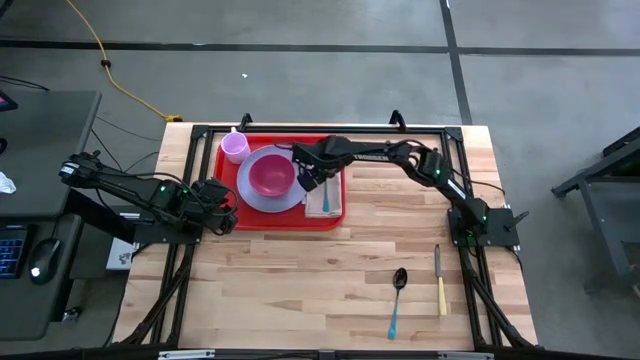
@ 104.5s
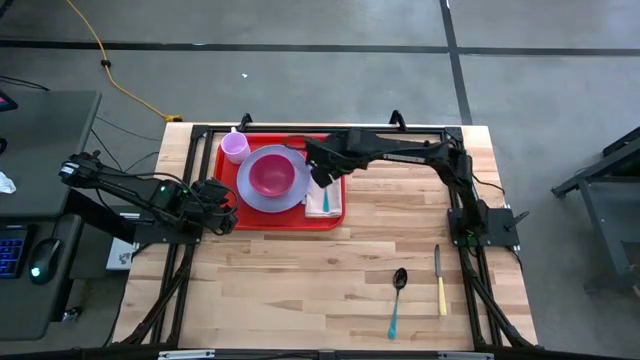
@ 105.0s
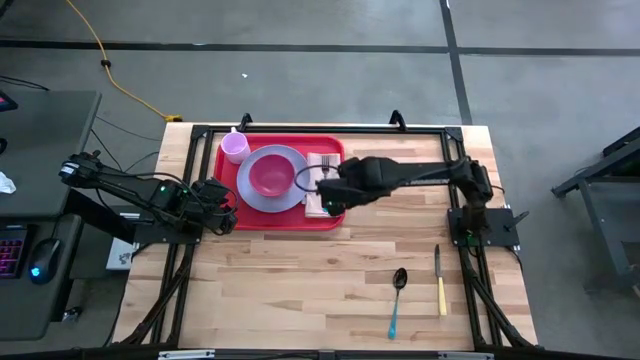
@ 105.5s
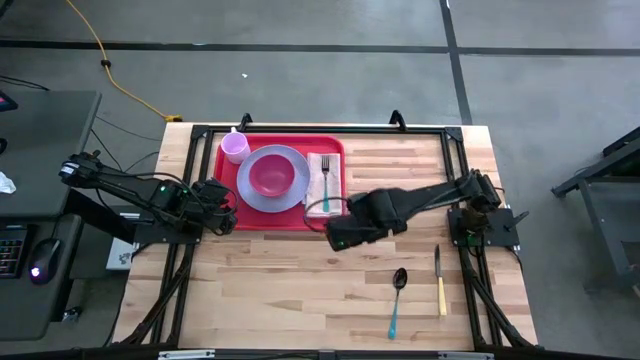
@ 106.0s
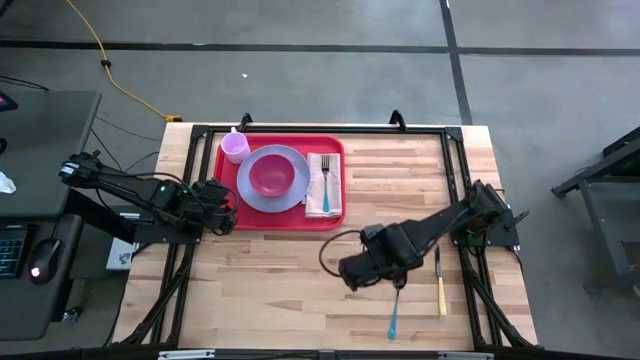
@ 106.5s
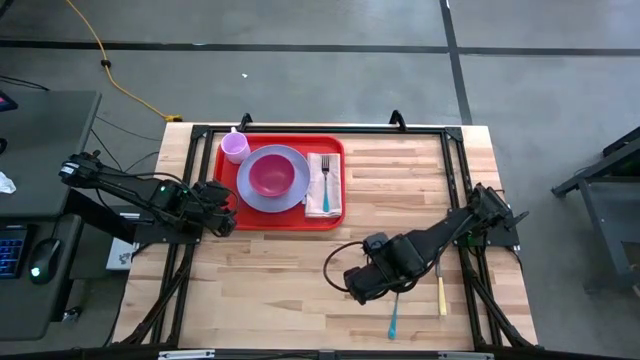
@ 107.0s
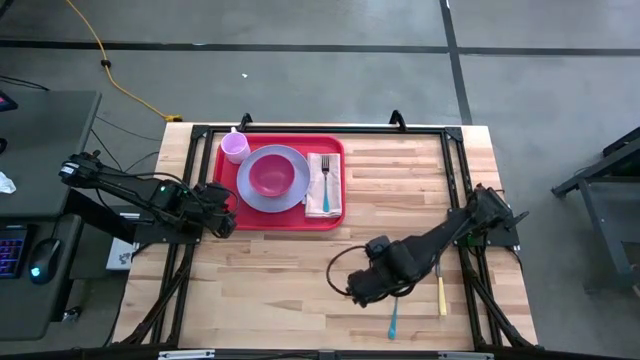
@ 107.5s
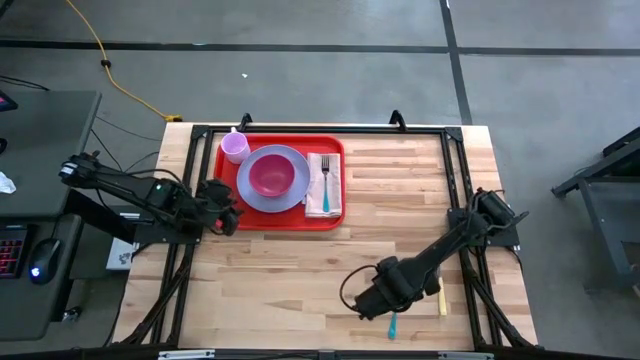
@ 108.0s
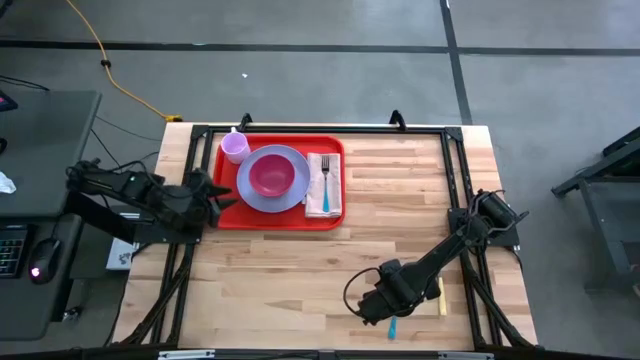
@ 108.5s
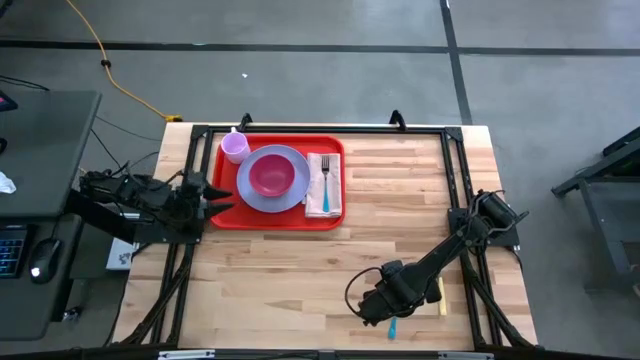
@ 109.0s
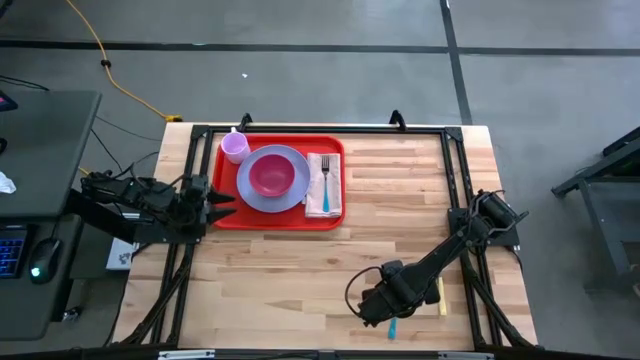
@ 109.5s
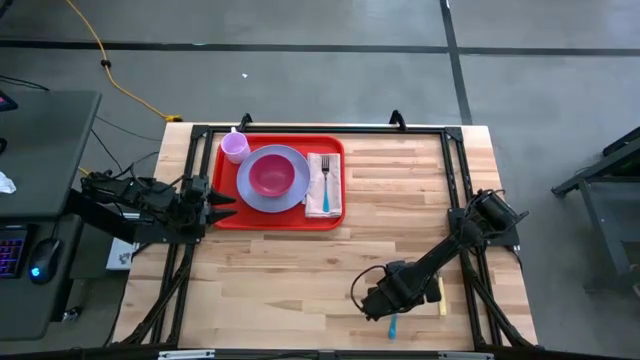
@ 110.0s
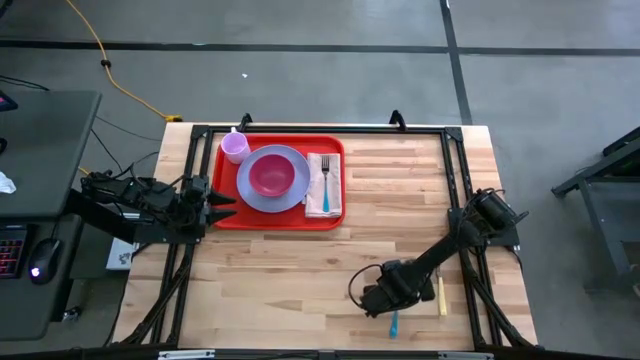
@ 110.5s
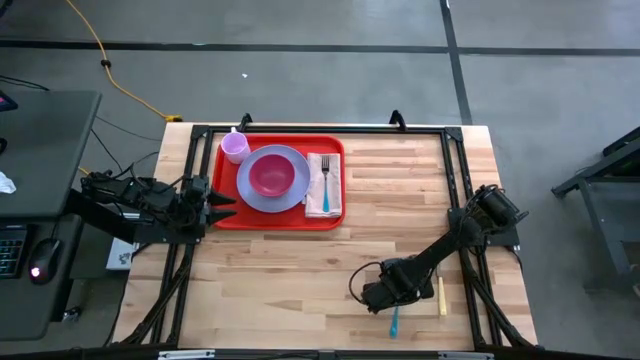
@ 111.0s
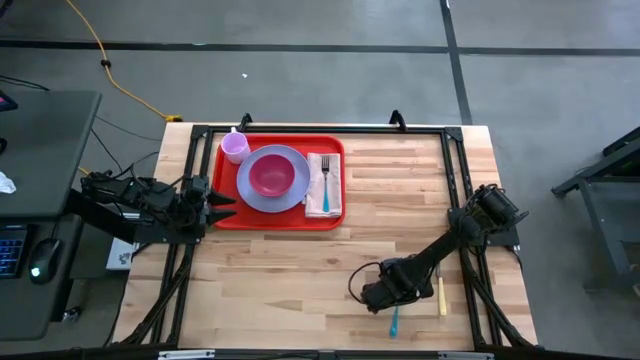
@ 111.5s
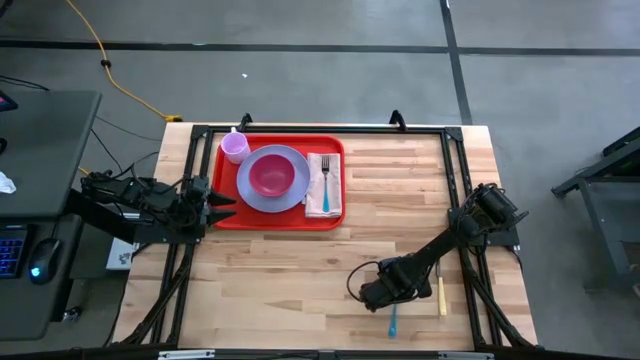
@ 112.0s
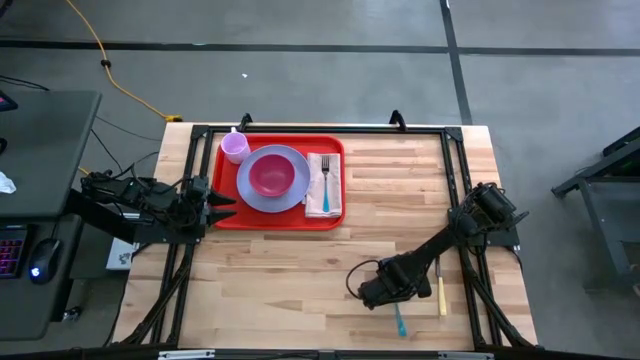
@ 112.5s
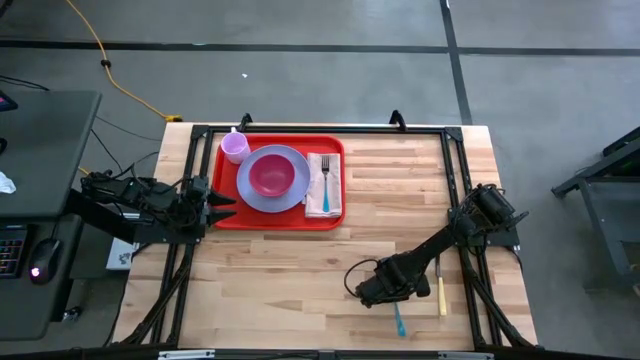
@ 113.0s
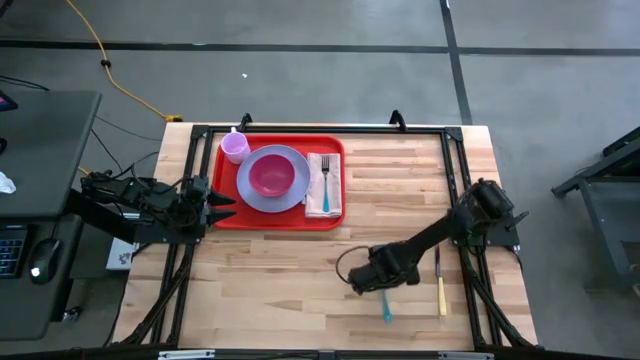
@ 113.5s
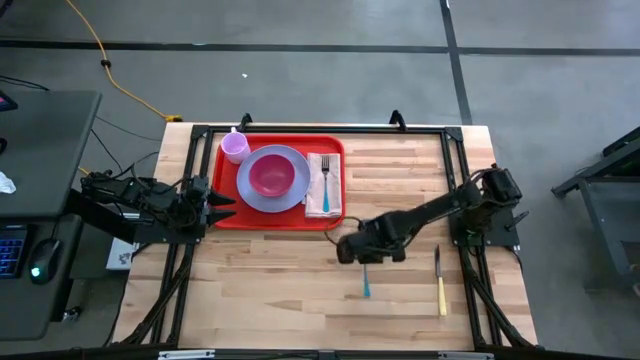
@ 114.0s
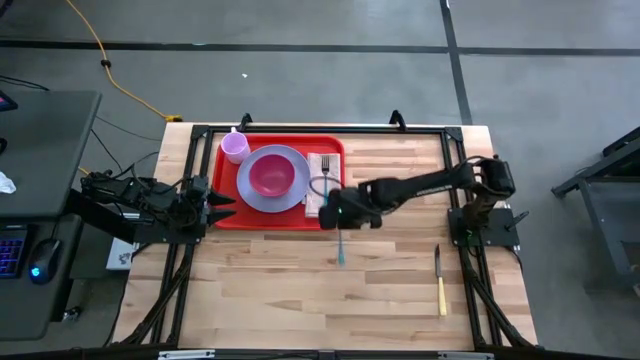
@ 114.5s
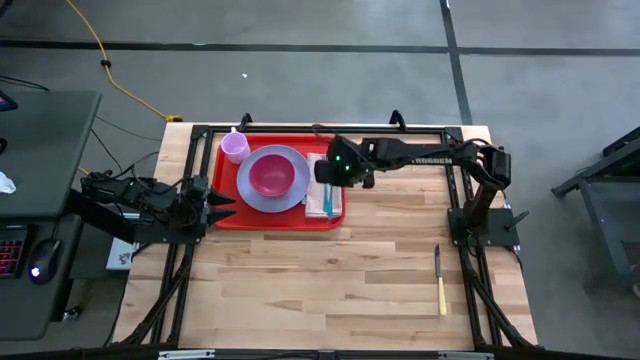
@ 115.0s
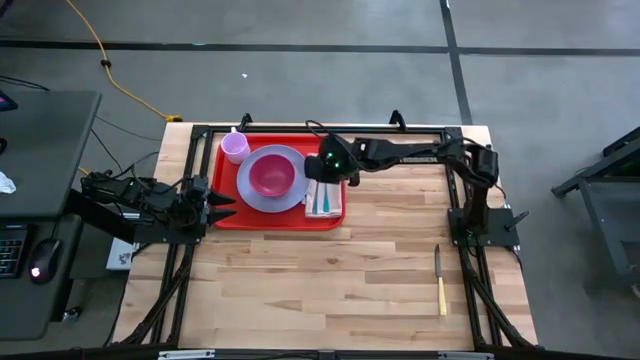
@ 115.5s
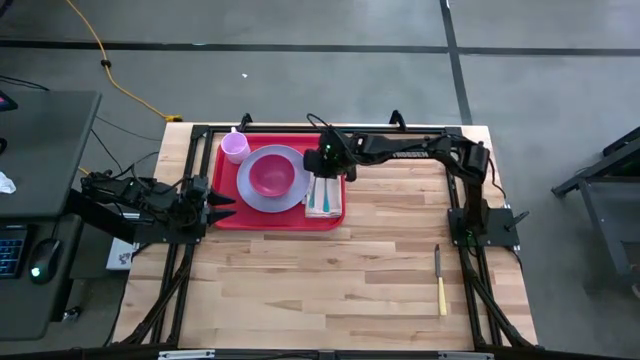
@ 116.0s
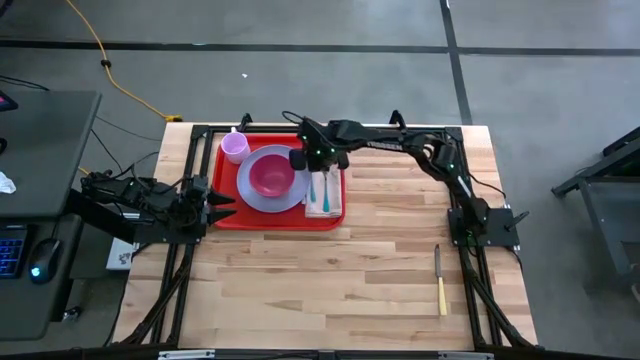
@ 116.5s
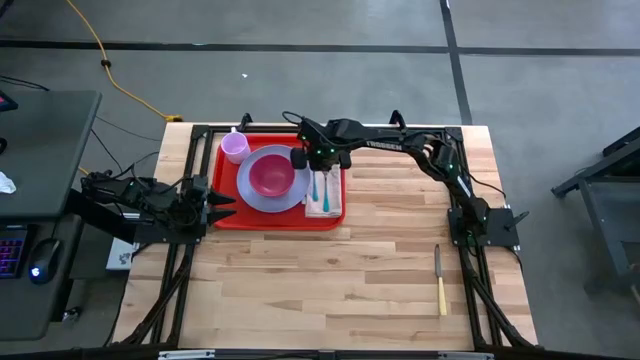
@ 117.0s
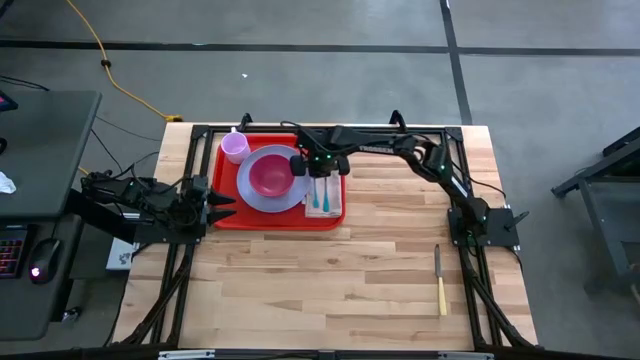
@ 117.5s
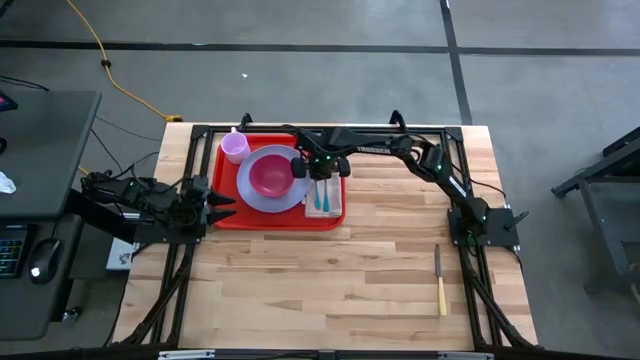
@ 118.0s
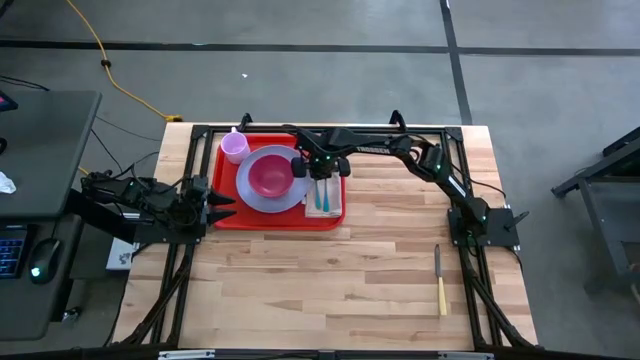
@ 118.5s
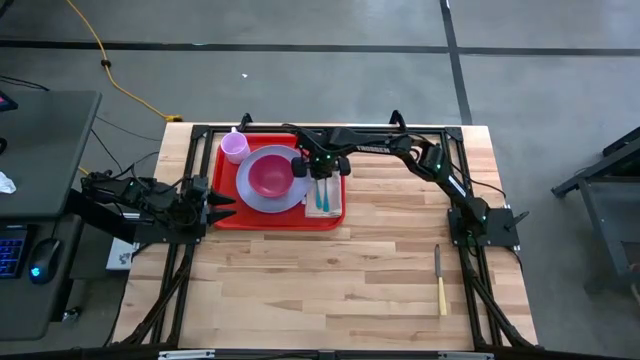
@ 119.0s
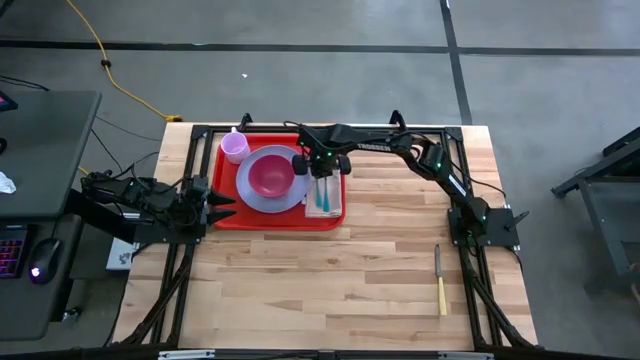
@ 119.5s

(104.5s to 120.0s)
Task: Set up tray
Put the blue spoon to the left of the blue fork on the brown napkin

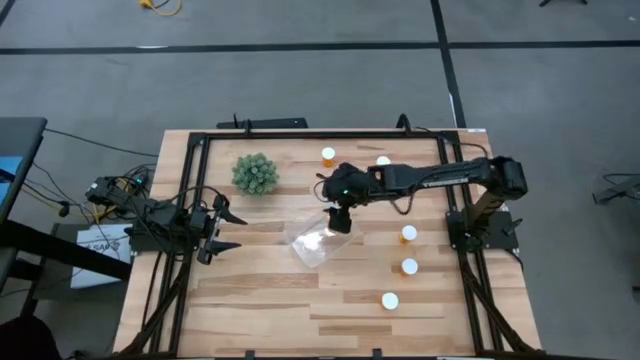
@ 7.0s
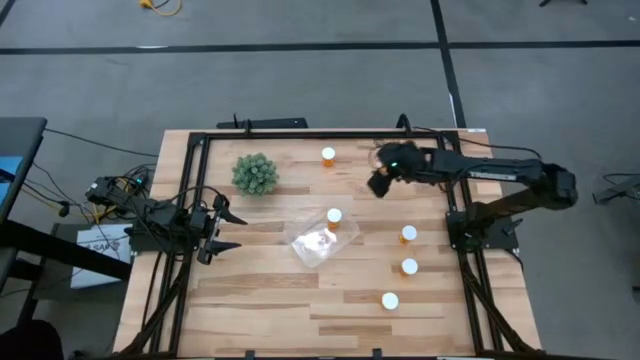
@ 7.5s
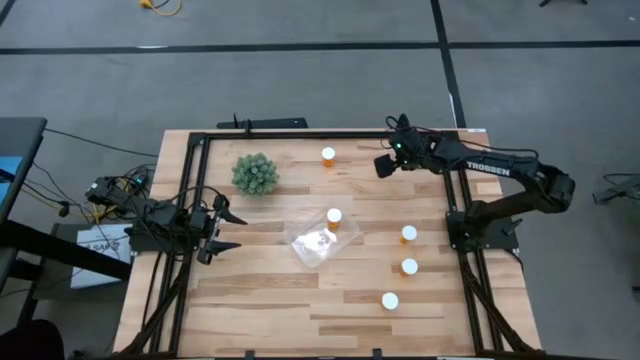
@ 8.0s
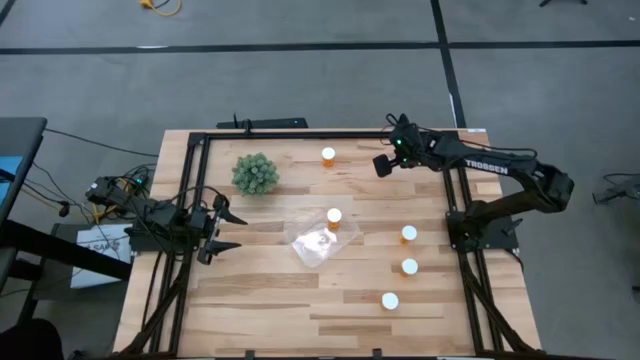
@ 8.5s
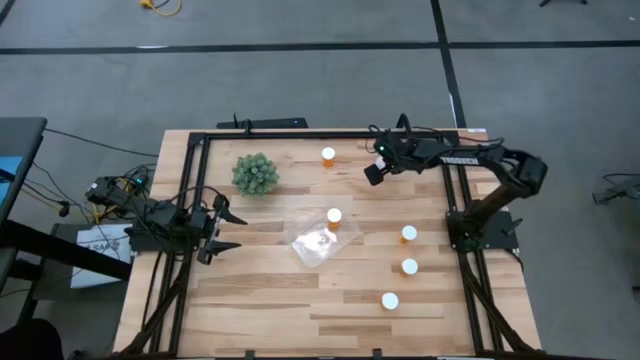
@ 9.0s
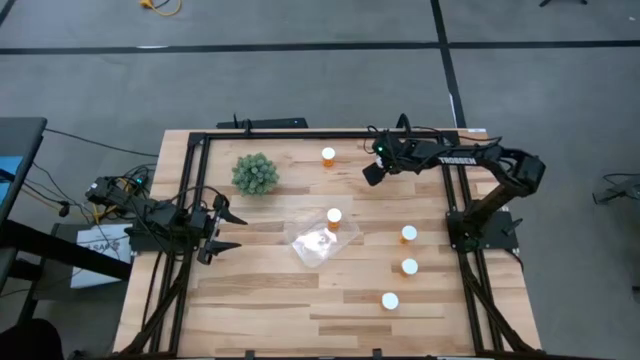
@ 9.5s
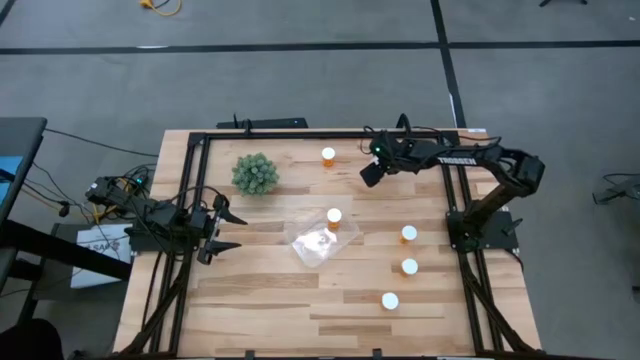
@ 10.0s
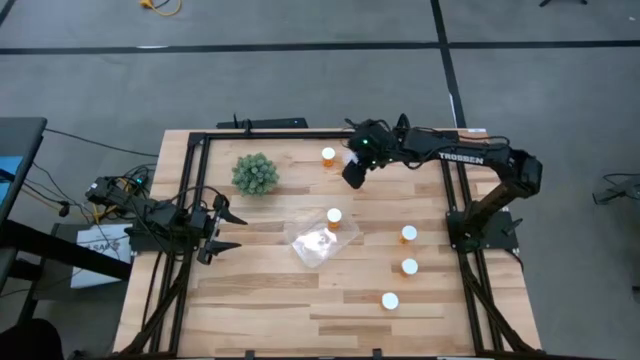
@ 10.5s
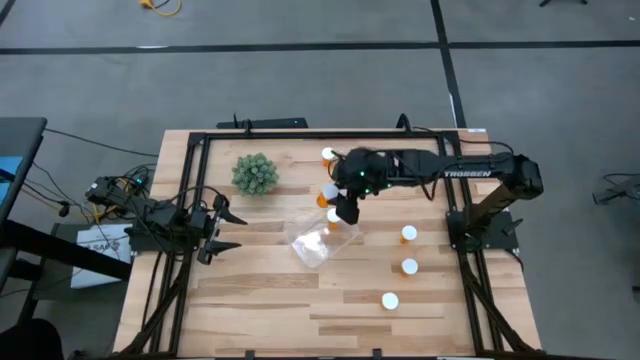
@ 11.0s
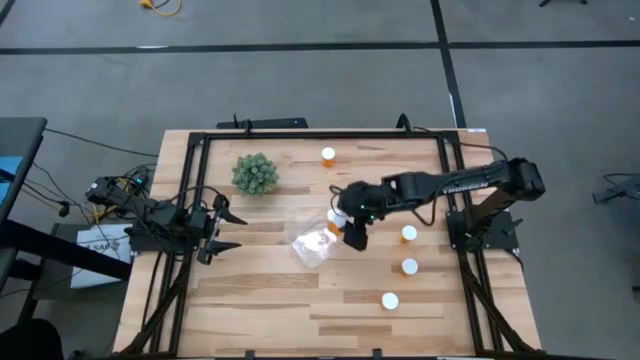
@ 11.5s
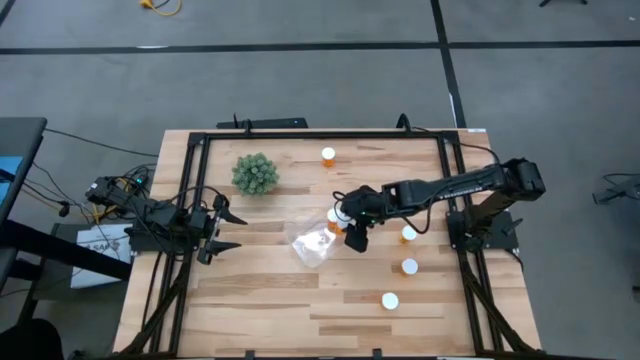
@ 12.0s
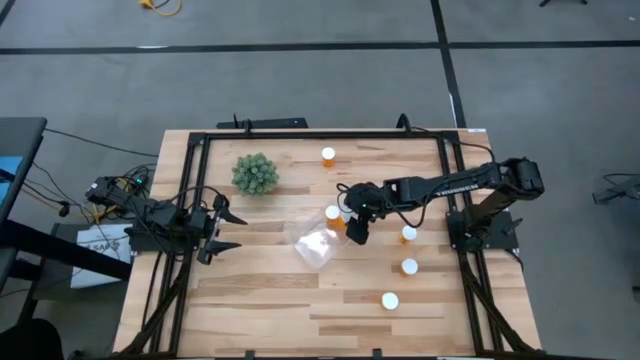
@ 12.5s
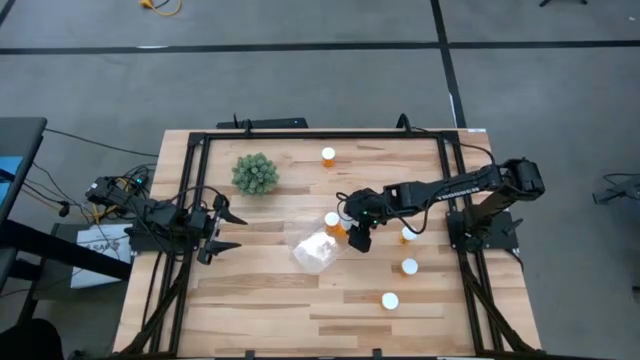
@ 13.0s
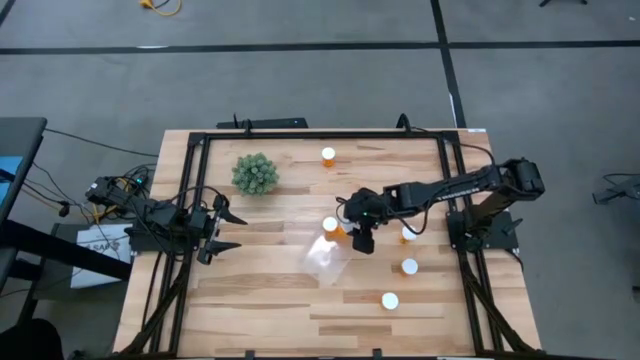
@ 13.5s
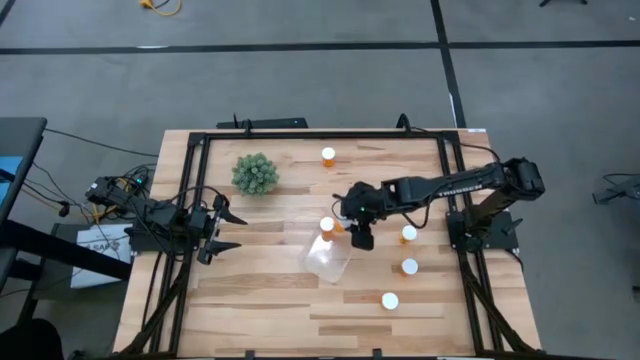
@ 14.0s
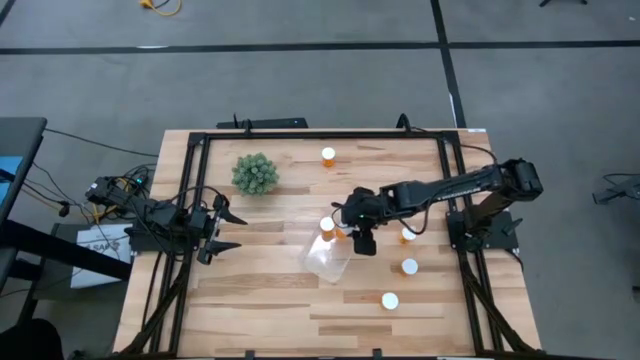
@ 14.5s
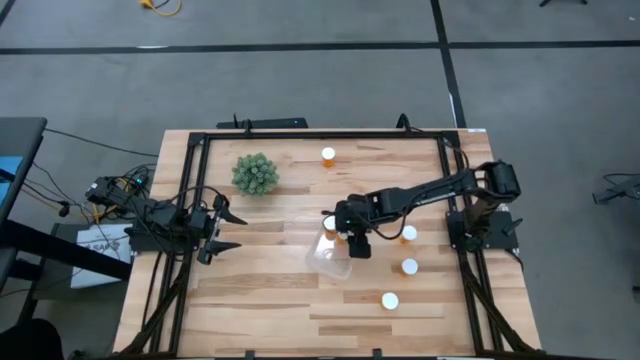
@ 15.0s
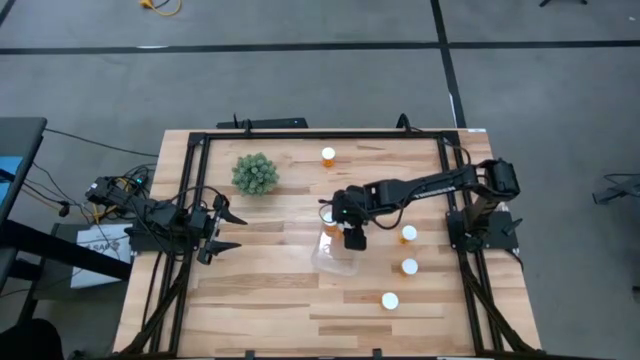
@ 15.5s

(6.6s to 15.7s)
Task: Pick and place pill bottles into a basket
Put the orange medicine bottle into the transparent bin
